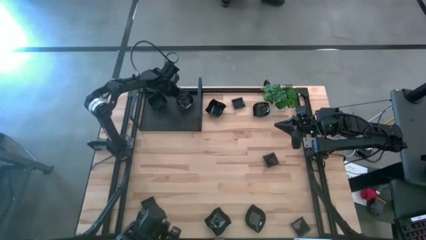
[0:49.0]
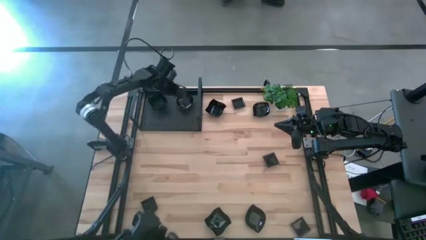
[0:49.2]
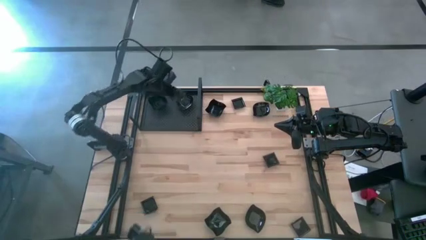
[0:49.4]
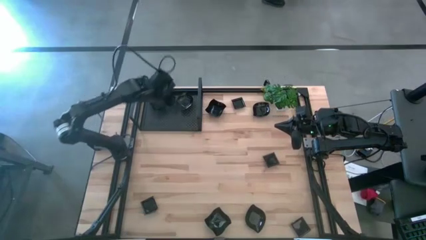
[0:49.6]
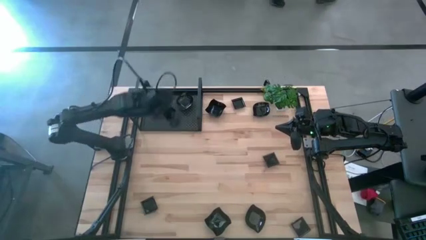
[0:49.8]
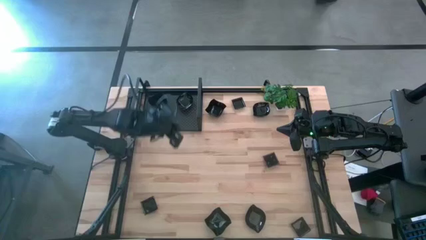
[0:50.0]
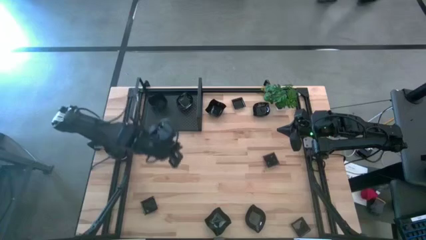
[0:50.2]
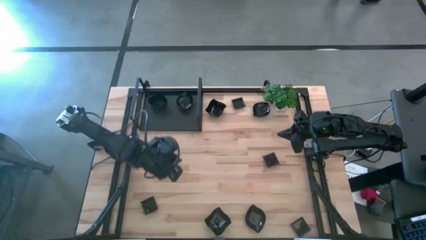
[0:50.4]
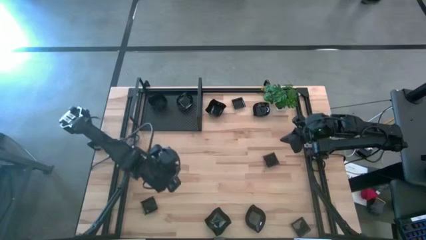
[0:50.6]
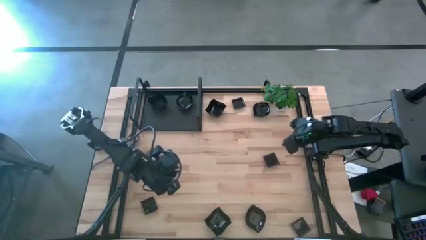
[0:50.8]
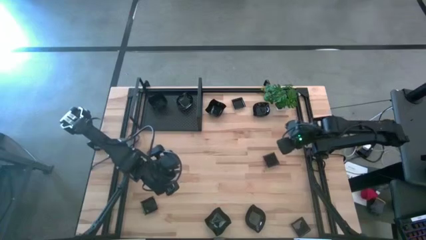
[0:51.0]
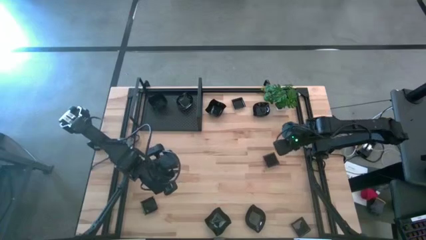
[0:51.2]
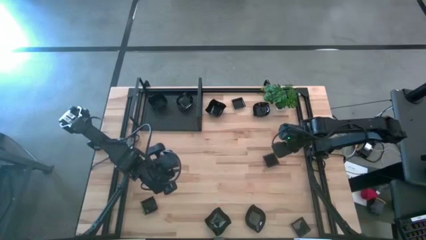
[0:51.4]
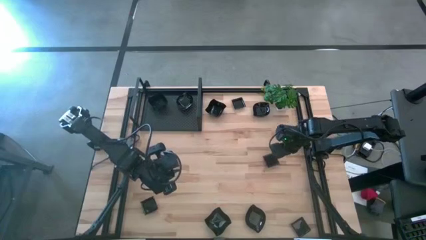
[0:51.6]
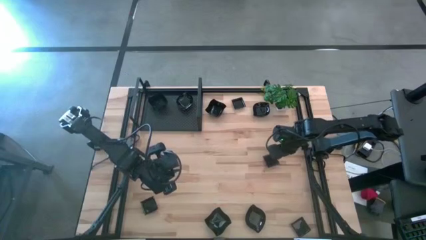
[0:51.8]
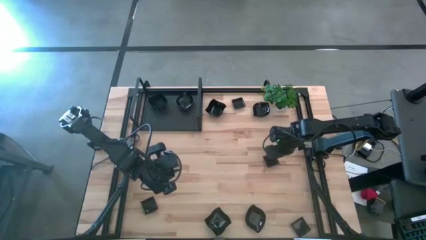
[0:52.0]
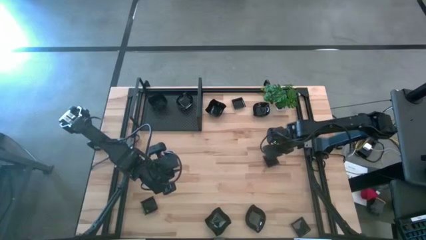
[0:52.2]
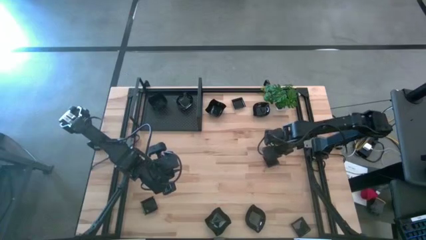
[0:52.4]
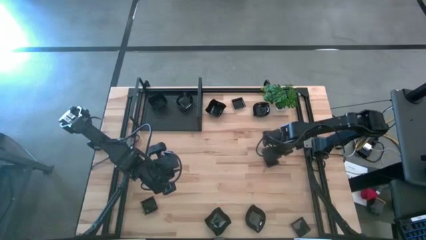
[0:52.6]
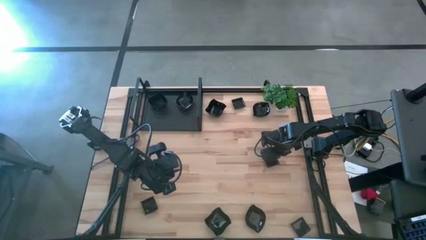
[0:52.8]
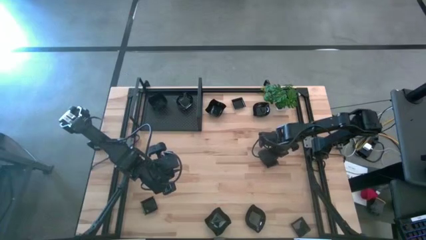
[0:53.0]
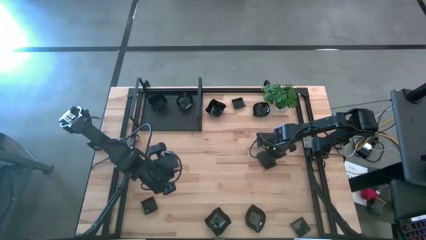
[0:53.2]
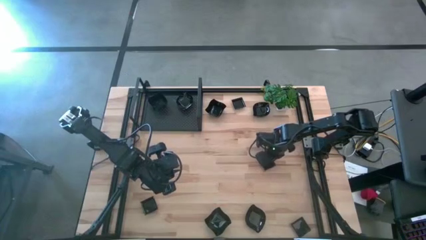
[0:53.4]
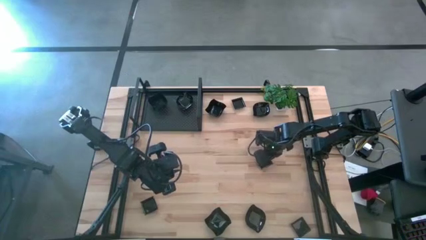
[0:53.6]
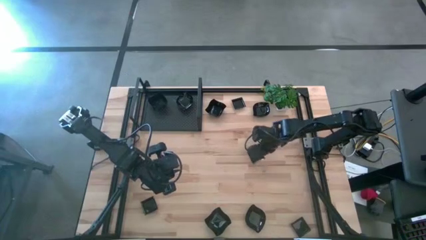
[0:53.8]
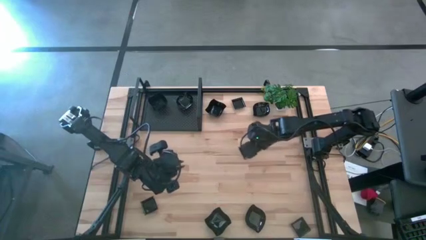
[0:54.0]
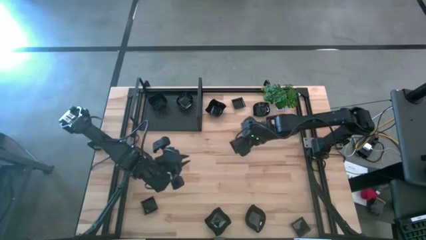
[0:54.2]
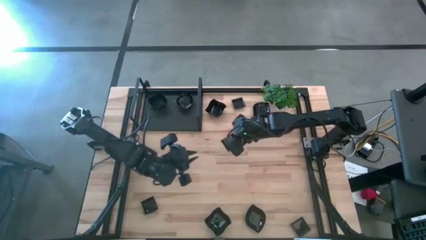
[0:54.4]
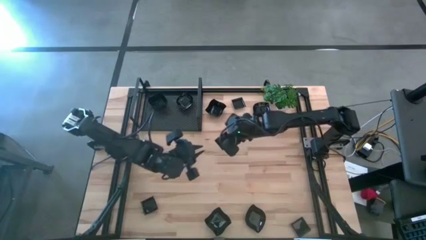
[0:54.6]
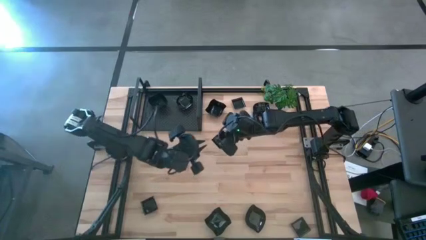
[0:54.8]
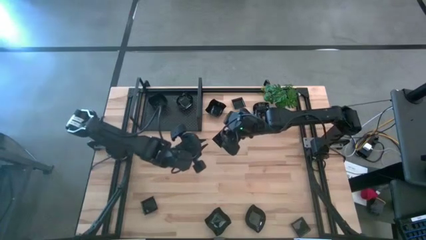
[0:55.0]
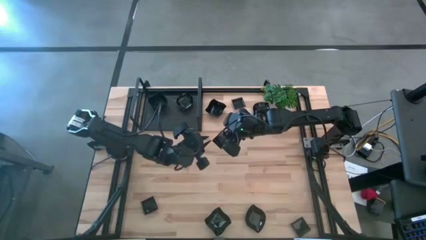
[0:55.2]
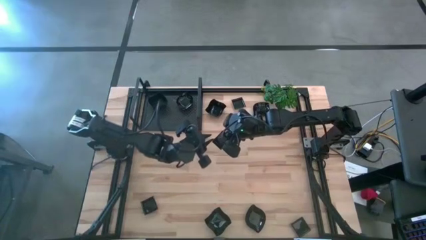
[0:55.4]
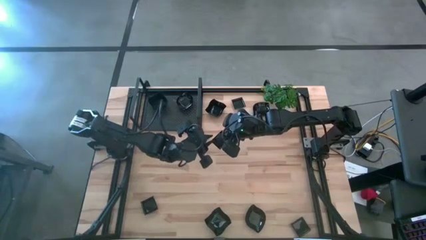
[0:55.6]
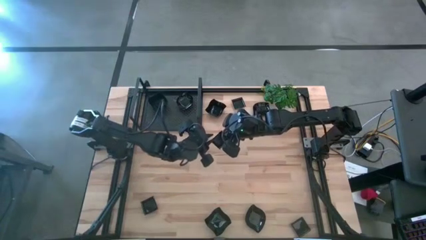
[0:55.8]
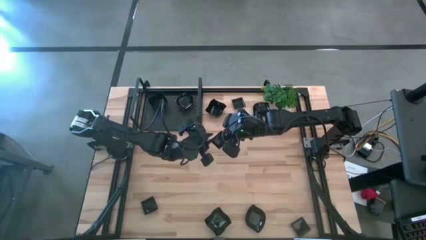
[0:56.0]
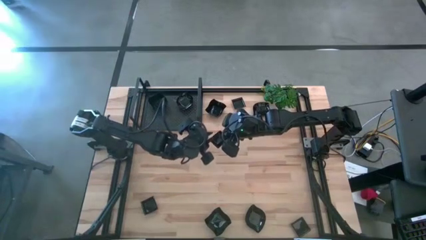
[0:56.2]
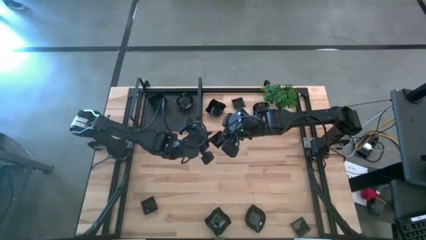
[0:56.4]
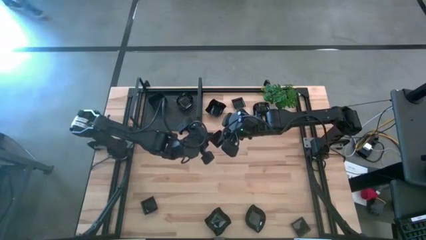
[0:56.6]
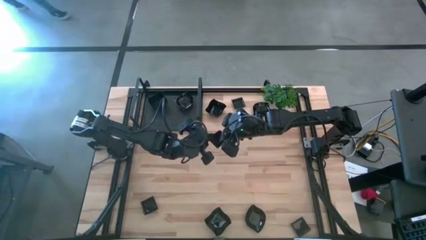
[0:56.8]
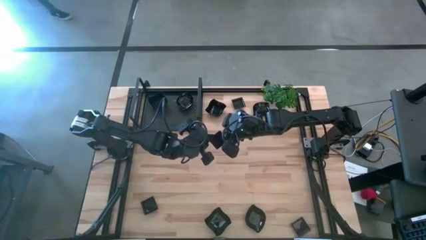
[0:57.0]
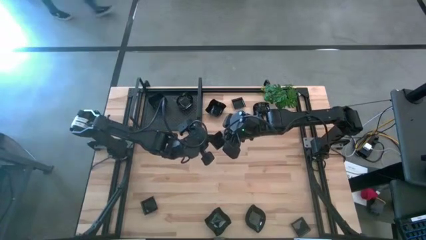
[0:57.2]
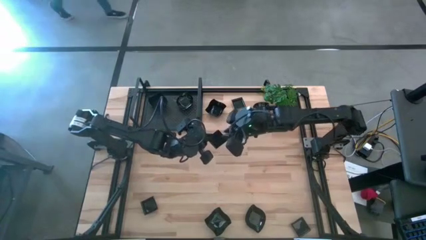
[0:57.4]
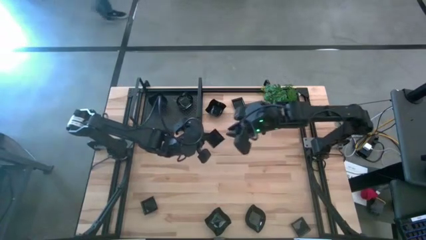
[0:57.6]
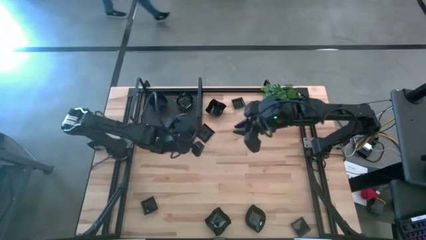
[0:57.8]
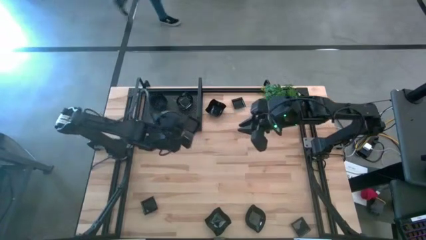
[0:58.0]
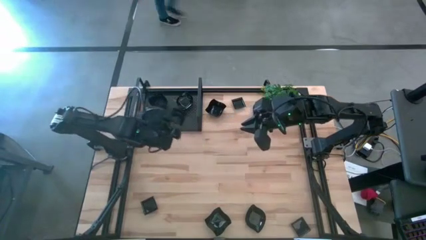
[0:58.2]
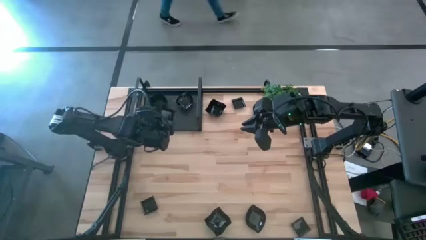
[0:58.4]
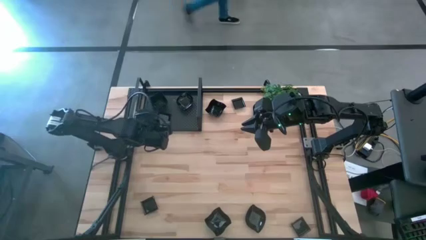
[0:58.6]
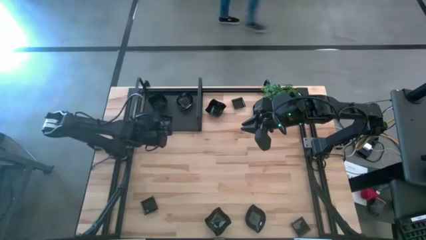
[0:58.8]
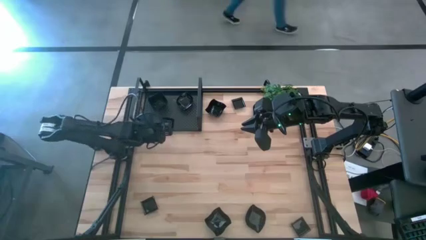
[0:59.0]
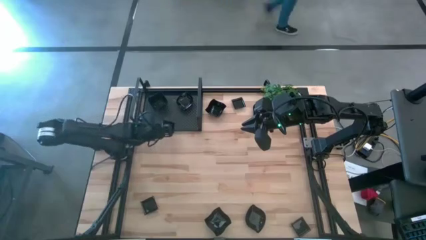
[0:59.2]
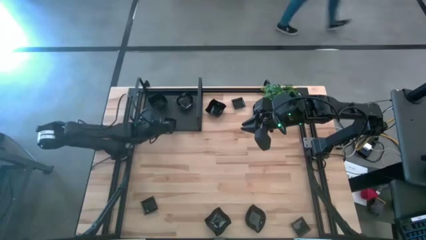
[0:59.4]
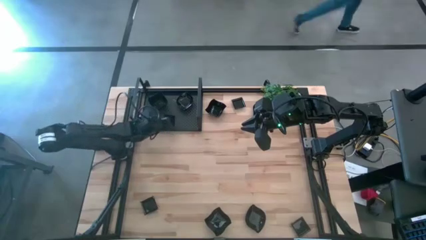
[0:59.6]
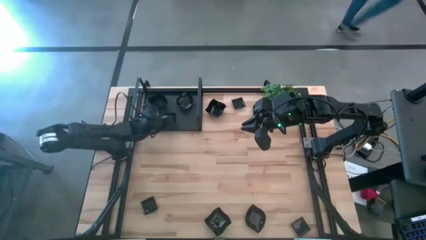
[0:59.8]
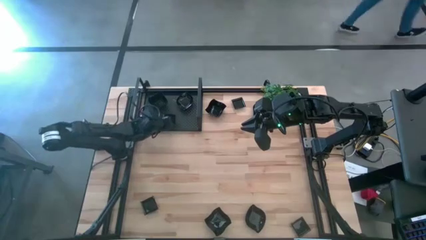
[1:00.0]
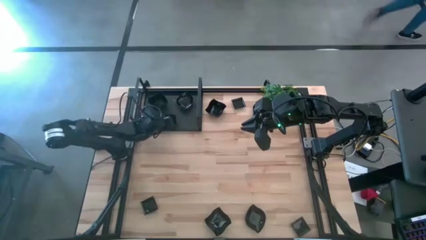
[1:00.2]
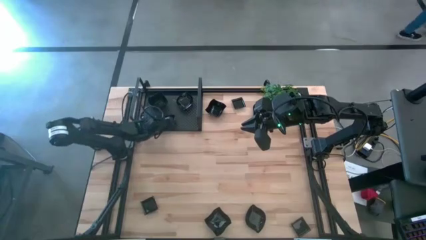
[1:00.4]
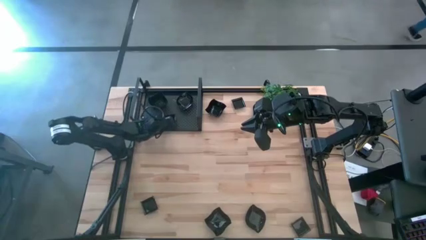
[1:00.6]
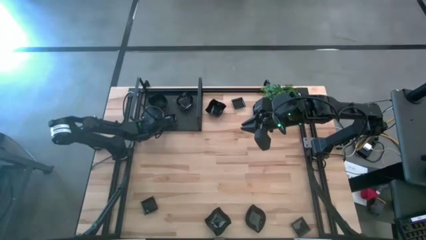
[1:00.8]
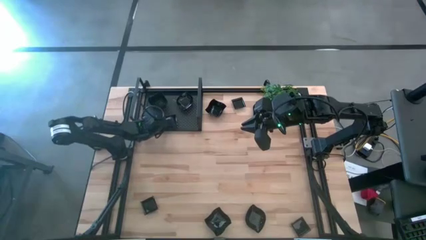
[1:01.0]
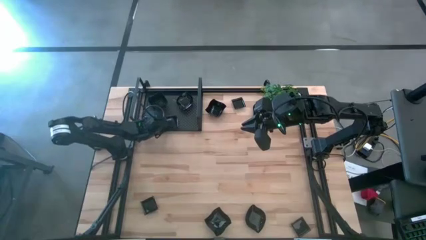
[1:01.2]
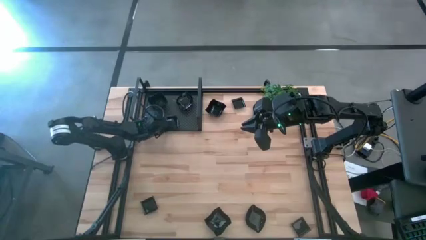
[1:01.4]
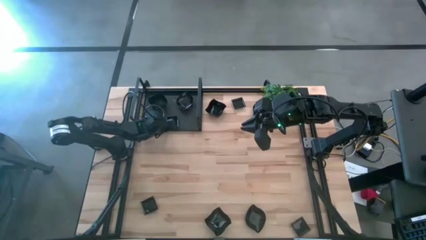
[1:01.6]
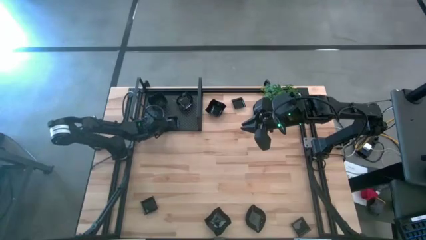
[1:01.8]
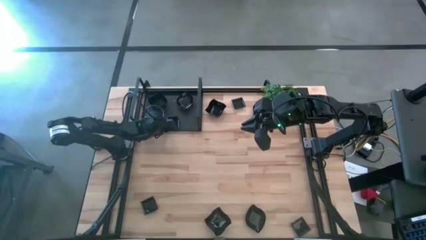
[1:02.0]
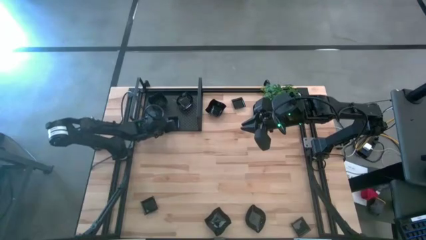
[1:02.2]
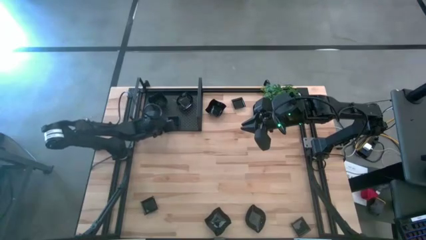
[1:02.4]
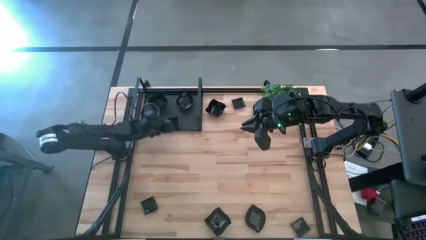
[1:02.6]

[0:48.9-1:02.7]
Task: Pick & Place Mini shaped plates
Put the black square plate on the shelf

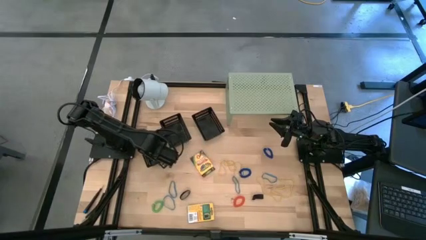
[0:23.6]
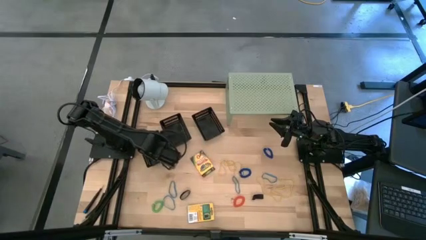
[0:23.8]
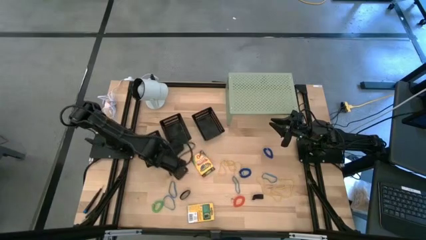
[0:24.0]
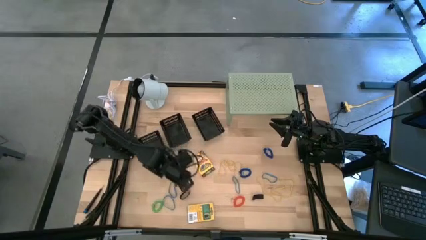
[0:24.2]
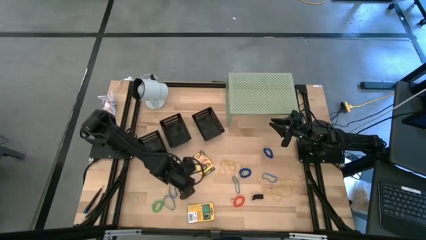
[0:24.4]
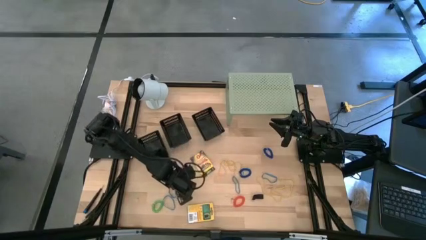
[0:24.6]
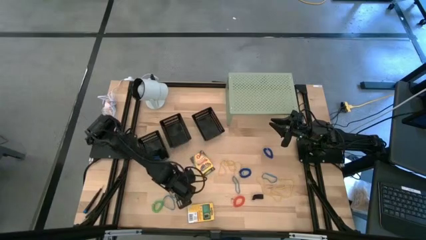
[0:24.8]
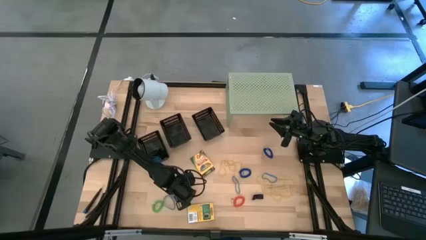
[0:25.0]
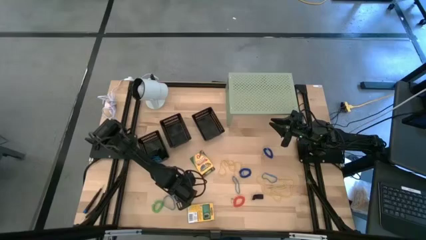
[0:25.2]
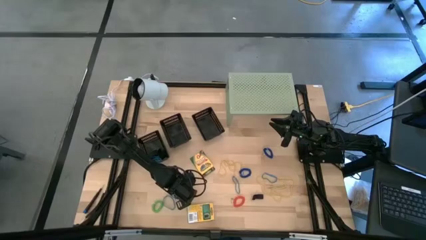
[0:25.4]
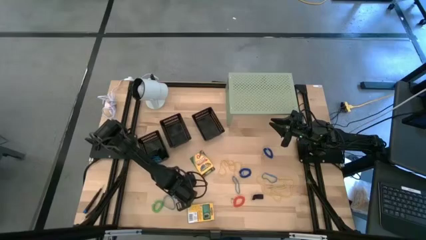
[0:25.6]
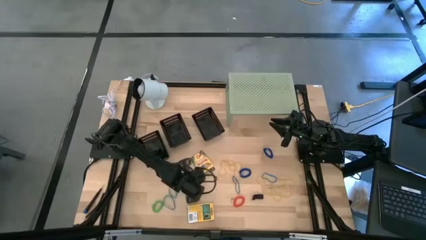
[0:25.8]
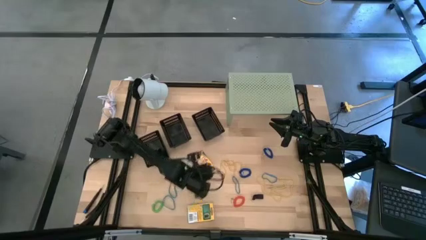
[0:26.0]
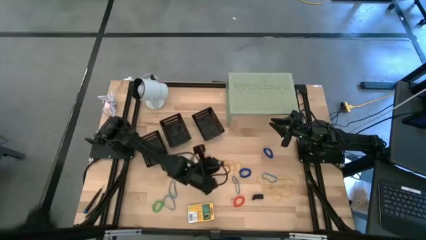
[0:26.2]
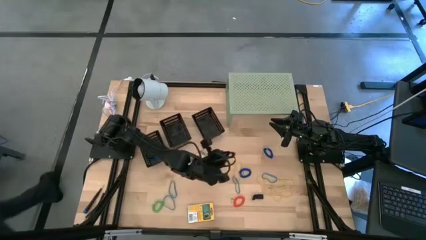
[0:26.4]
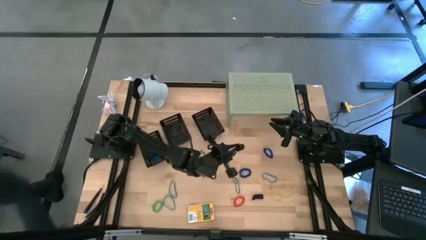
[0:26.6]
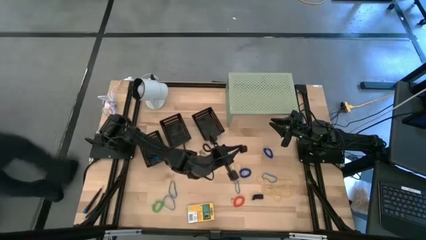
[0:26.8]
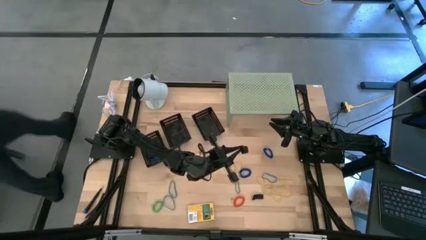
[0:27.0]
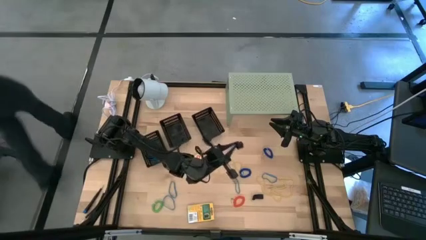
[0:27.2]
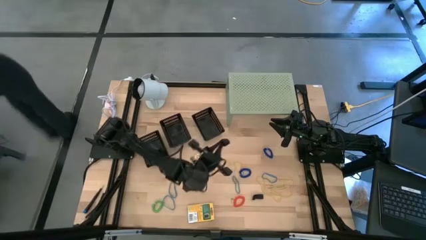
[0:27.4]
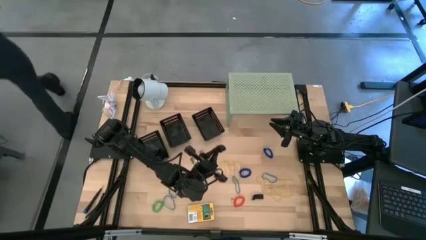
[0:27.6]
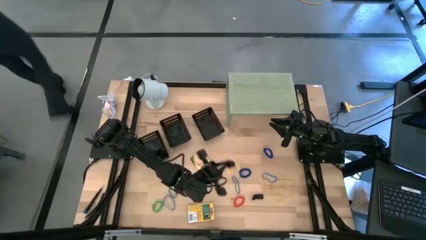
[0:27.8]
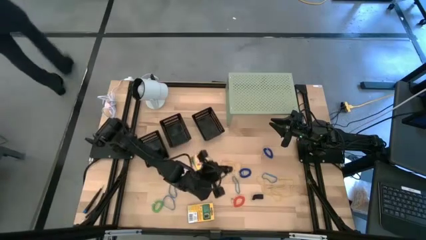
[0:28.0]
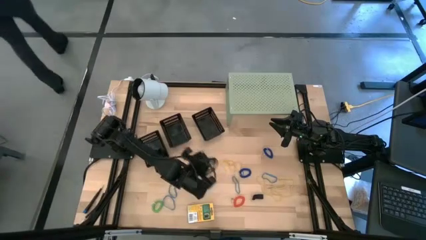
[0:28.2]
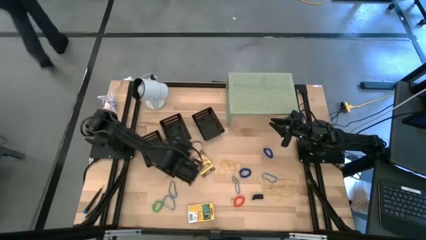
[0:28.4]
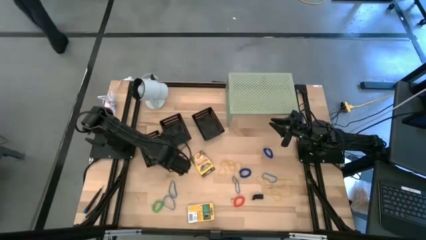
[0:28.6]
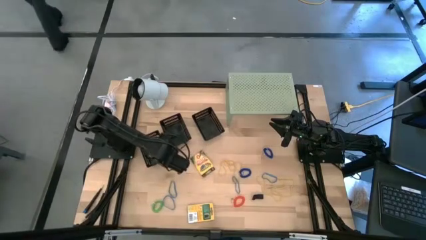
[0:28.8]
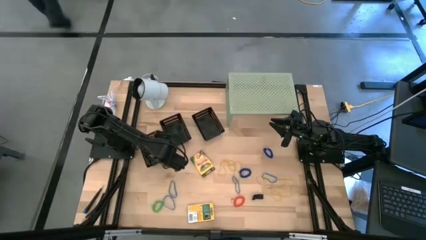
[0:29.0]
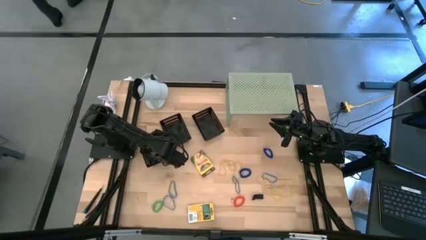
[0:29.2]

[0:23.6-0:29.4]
Task: Pick & Place Office Desk Supplies
Put the black rubber band into the left black basket
